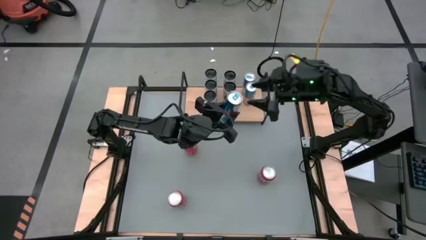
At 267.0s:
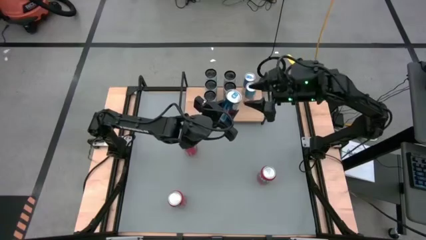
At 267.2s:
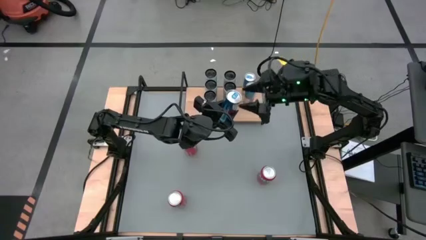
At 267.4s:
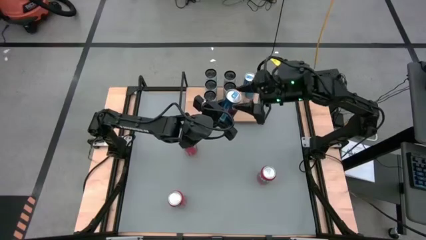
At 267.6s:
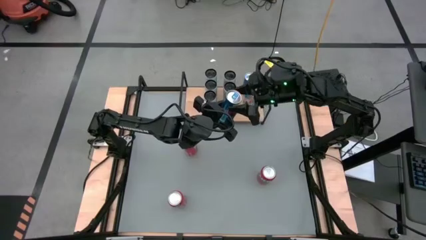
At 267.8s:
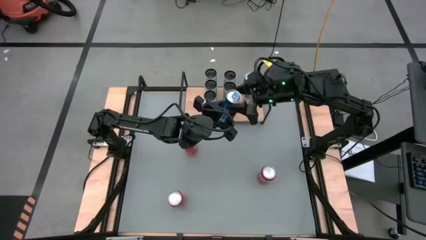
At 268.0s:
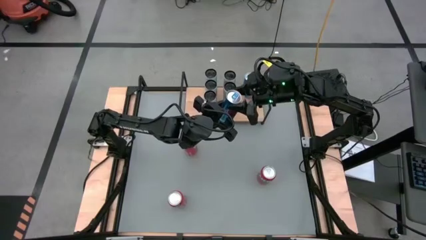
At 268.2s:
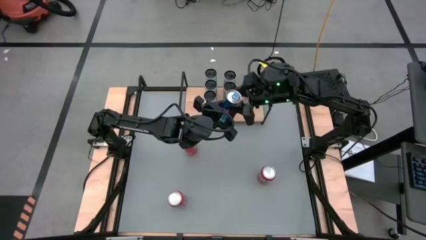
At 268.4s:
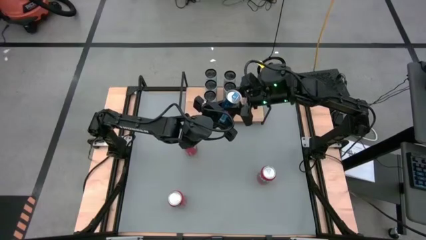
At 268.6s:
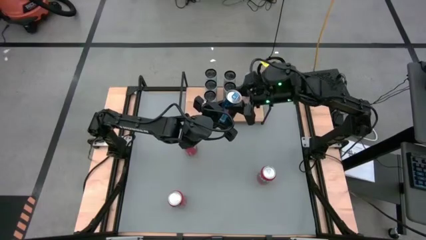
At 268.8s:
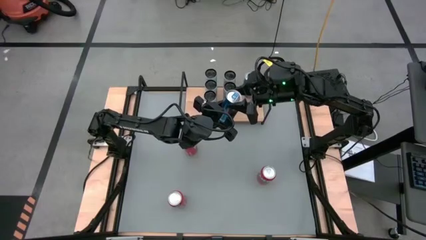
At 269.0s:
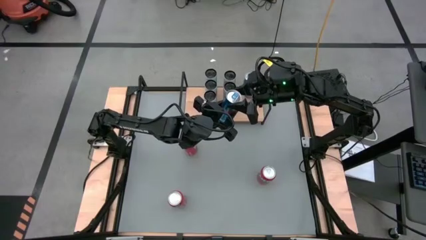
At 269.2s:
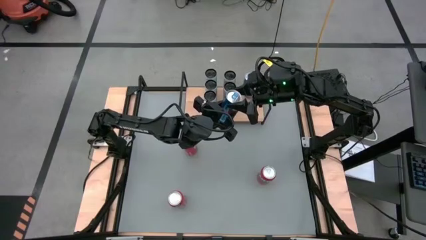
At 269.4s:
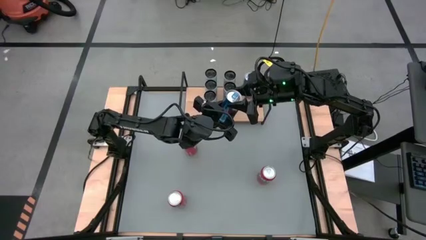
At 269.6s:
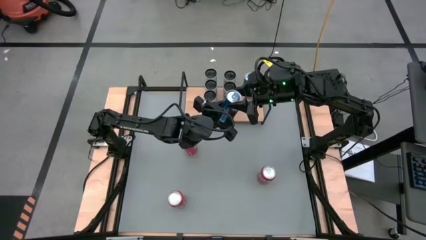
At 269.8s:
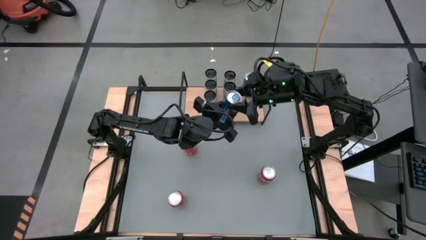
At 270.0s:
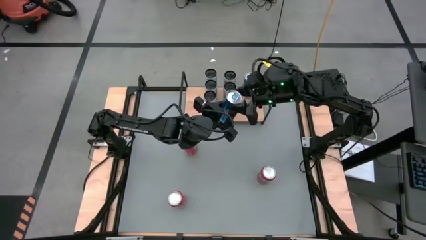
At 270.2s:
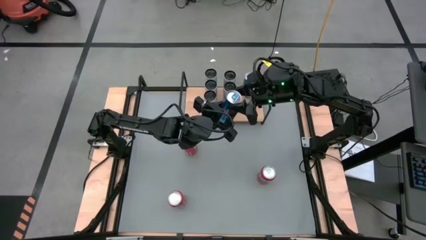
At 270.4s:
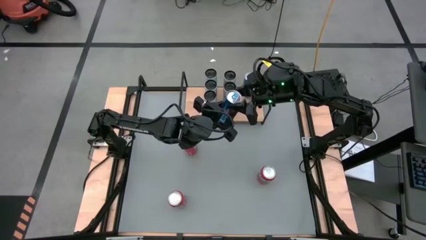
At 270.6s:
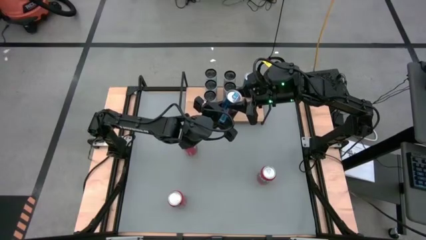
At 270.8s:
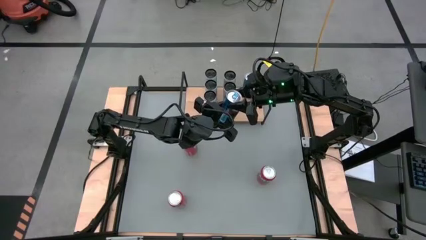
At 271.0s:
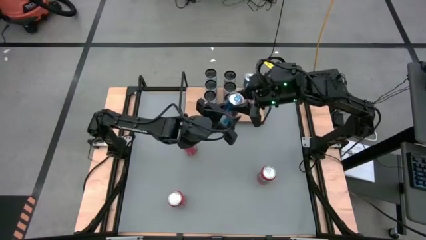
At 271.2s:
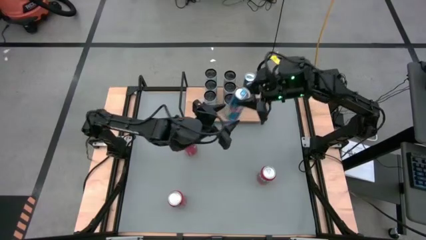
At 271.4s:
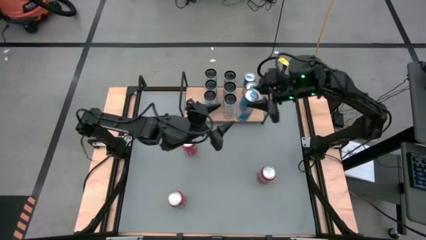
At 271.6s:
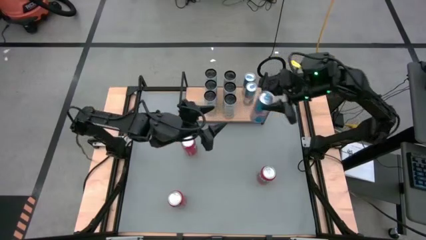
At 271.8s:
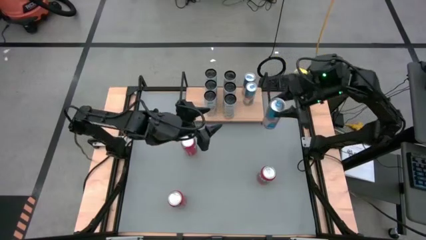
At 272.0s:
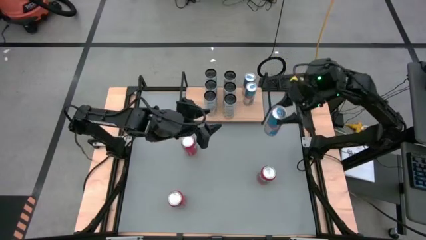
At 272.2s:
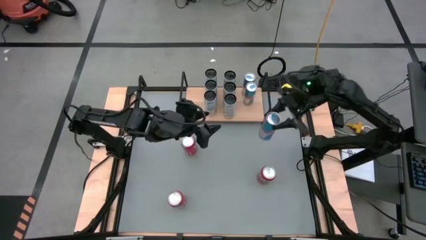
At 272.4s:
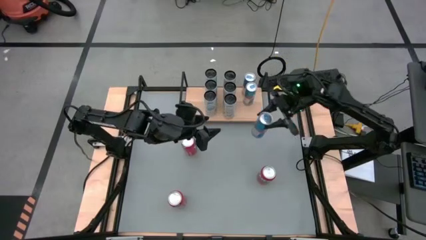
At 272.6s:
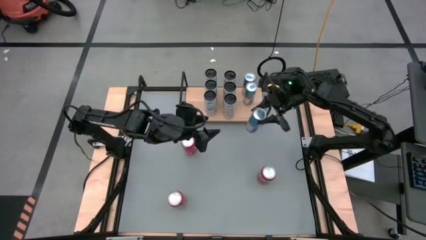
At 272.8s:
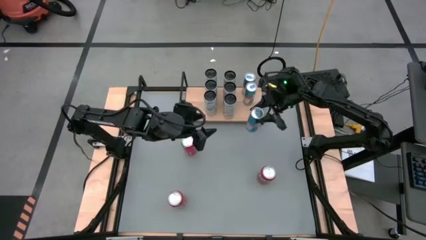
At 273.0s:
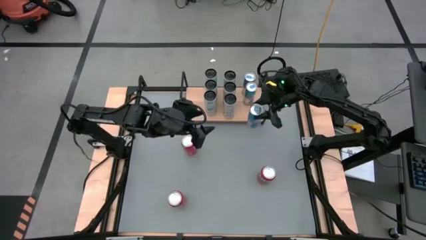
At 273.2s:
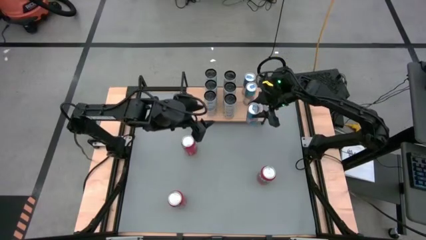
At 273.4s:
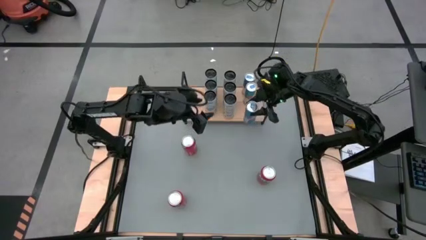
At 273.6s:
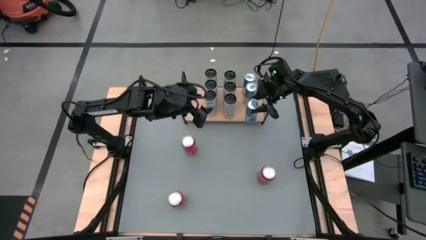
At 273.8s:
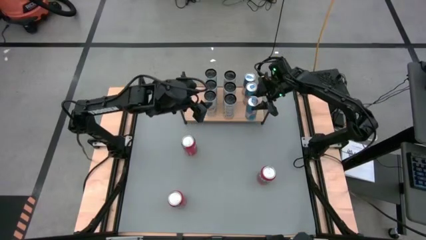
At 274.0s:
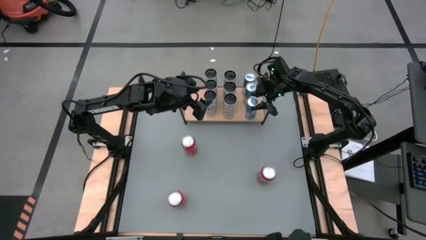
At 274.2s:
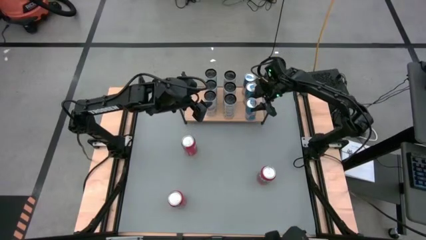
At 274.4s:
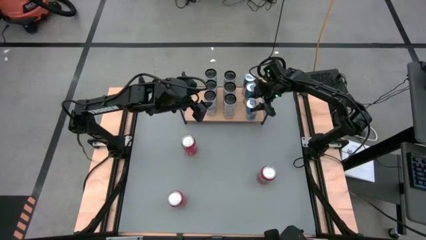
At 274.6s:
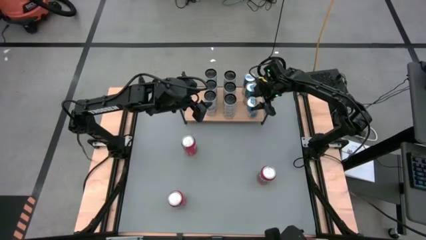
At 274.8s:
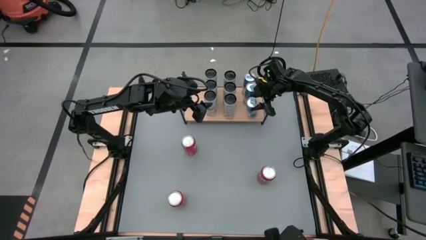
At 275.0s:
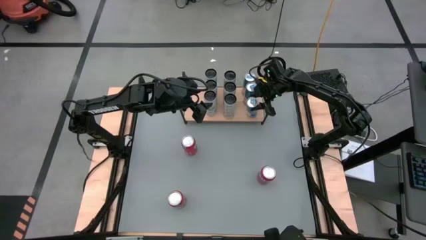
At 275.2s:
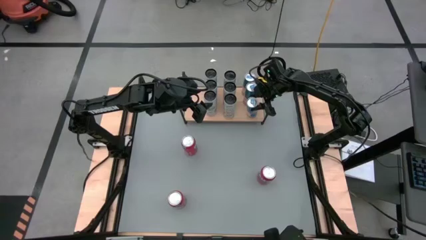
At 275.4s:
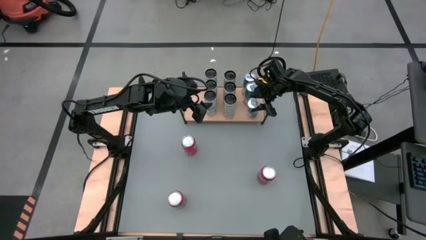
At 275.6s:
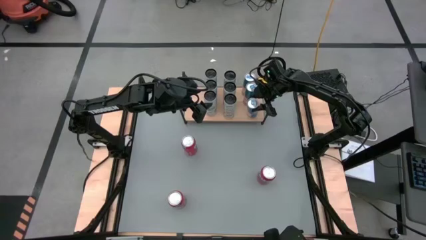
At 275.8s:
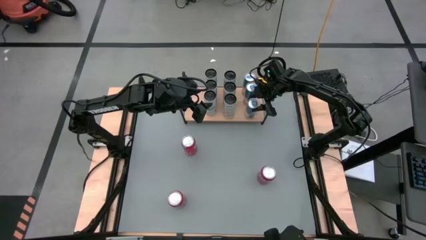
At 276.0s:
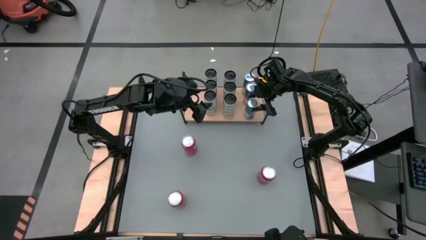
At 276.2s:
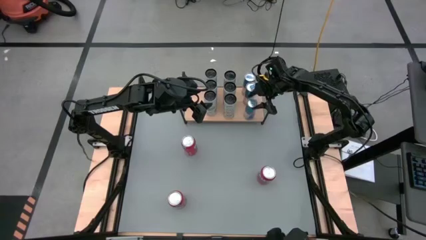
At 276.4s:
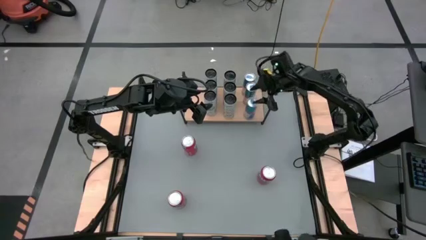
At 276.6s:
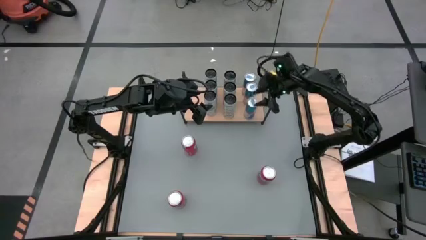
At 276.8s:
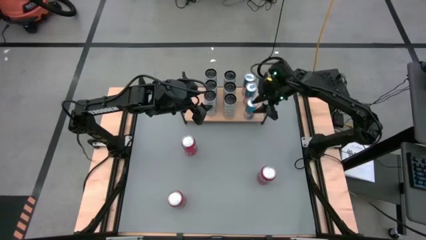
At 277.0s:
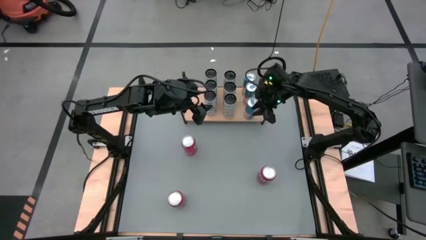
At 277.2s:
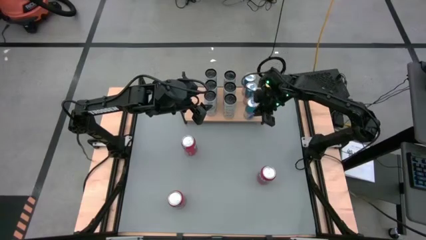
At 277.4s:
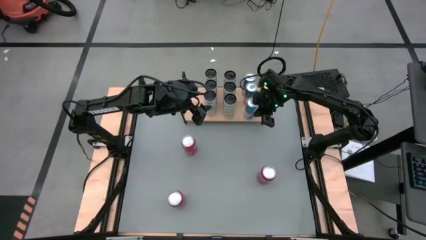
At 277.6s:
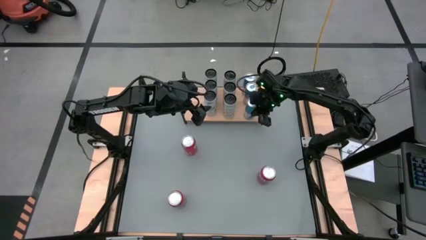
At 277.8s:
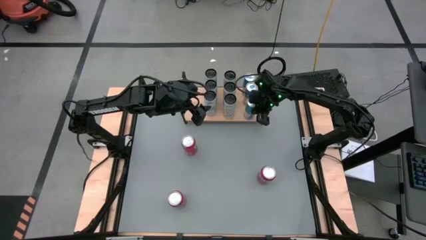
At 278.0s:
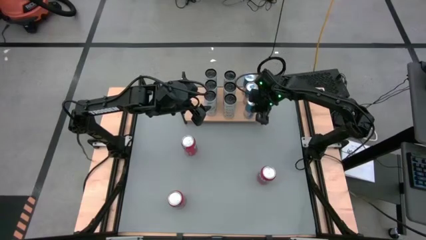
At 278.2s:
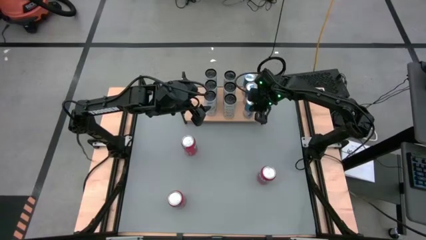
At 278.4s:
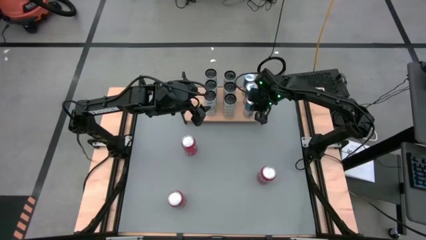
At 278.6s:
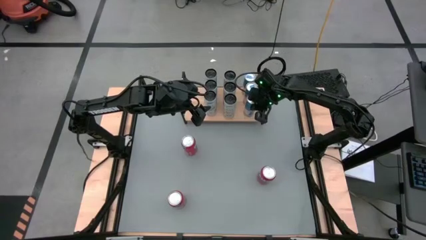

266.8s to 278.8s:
Task: Place canned beverage on shelf
Put the blue soda can aligned with the other blue soda can on the shelf
